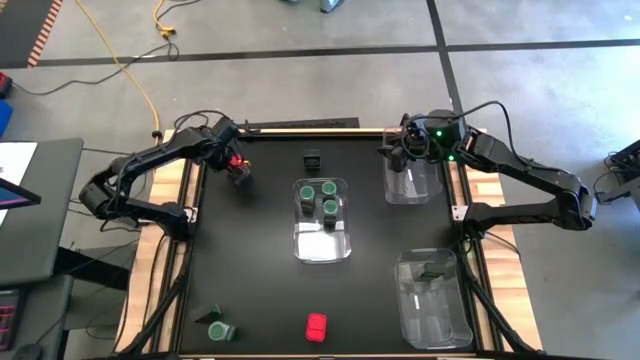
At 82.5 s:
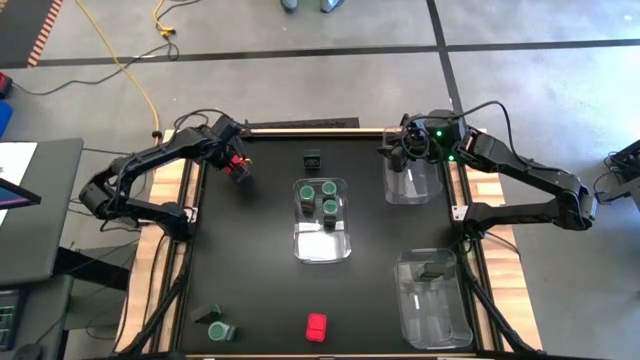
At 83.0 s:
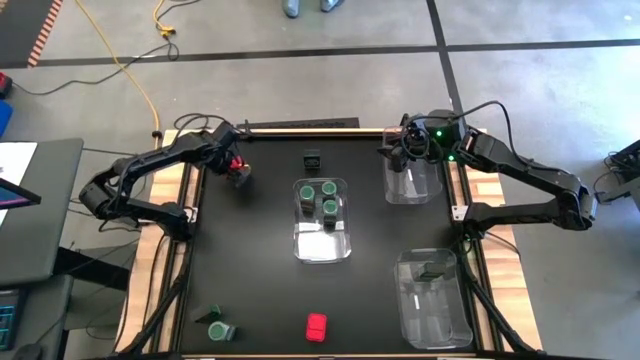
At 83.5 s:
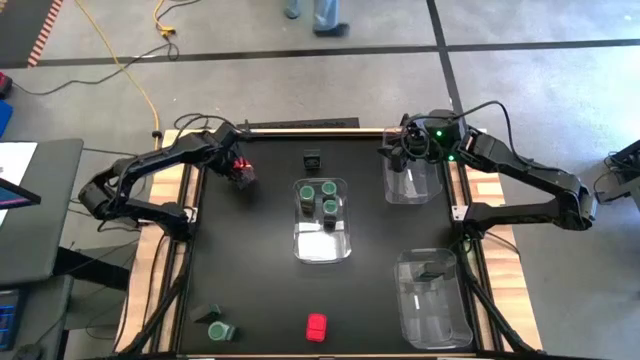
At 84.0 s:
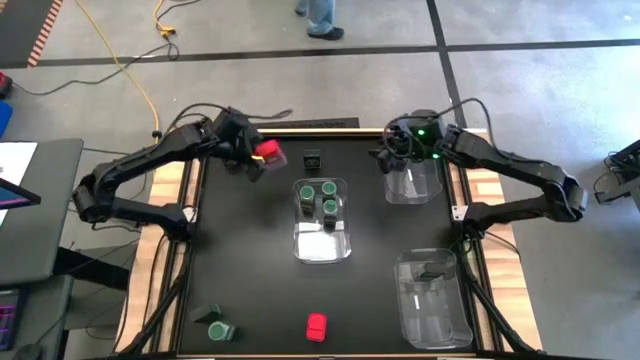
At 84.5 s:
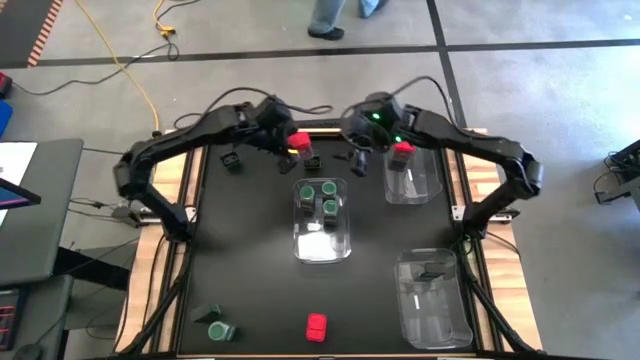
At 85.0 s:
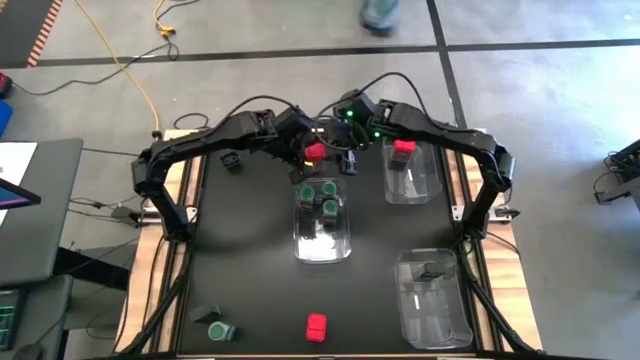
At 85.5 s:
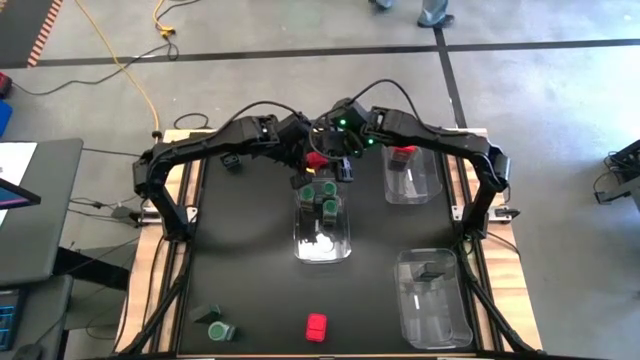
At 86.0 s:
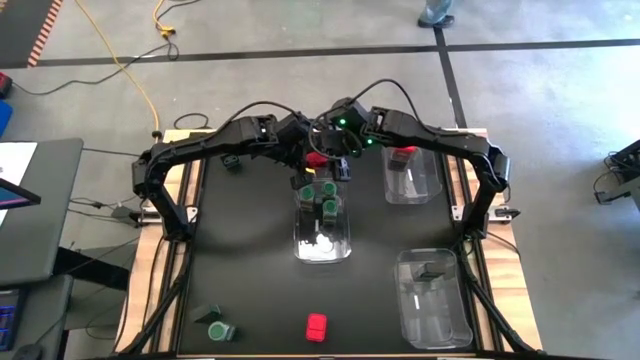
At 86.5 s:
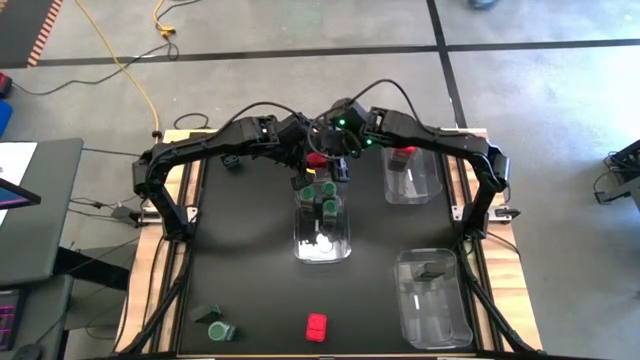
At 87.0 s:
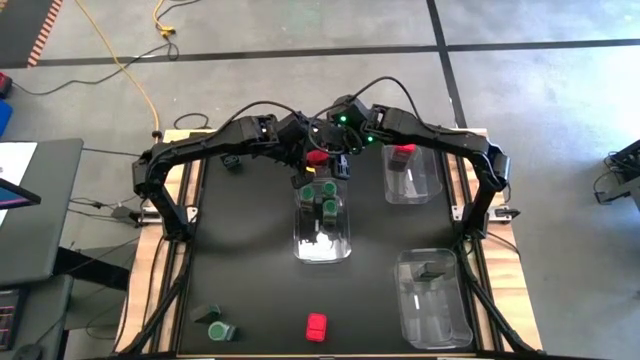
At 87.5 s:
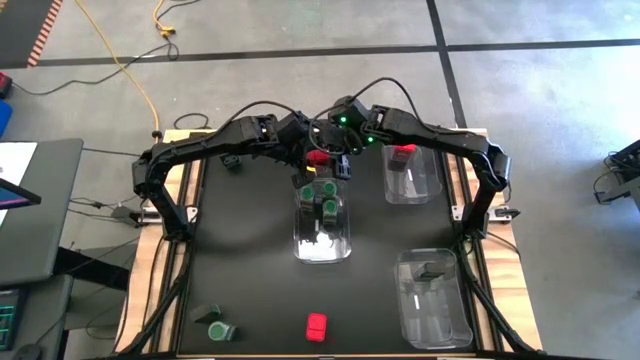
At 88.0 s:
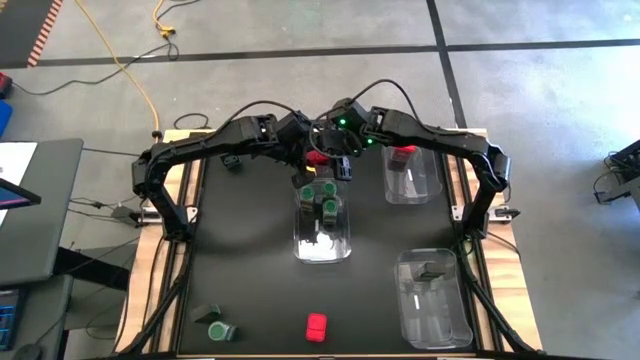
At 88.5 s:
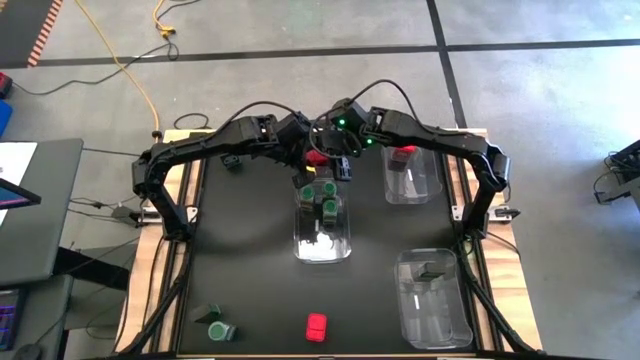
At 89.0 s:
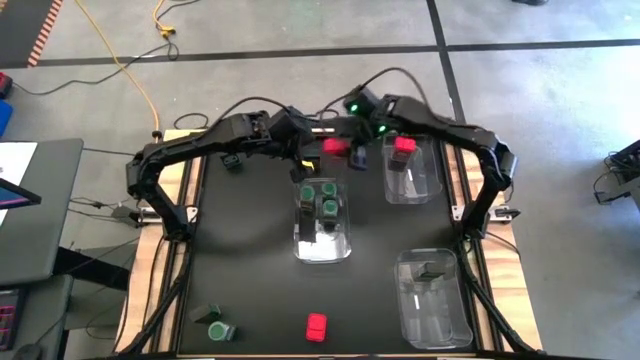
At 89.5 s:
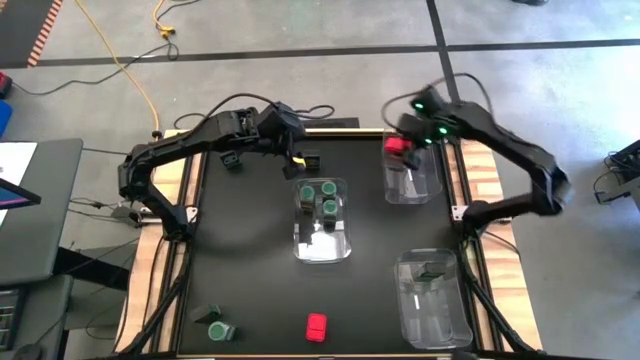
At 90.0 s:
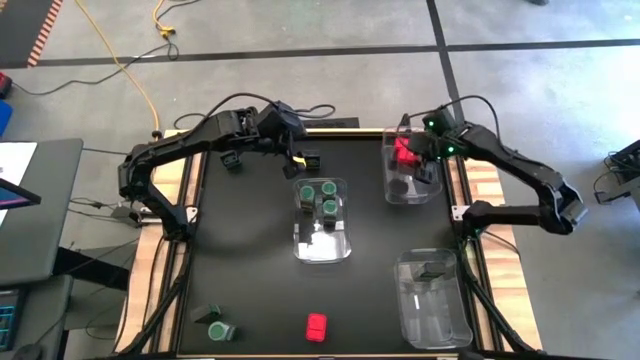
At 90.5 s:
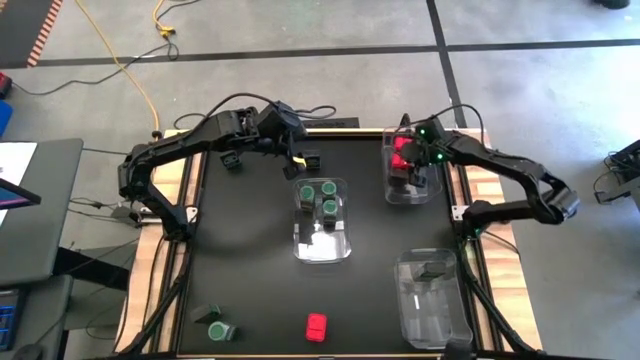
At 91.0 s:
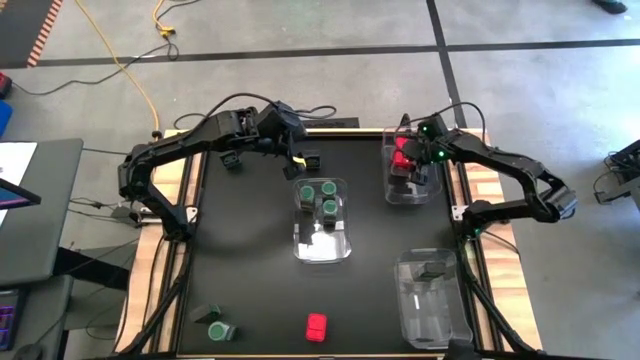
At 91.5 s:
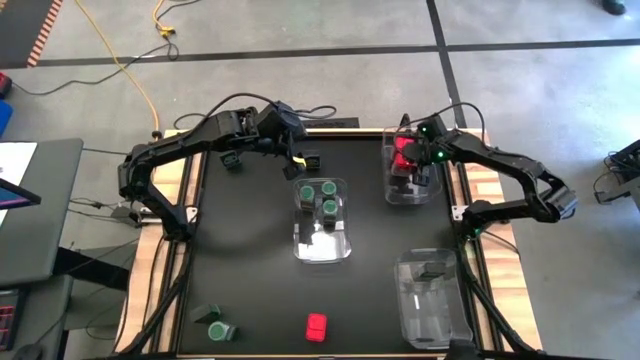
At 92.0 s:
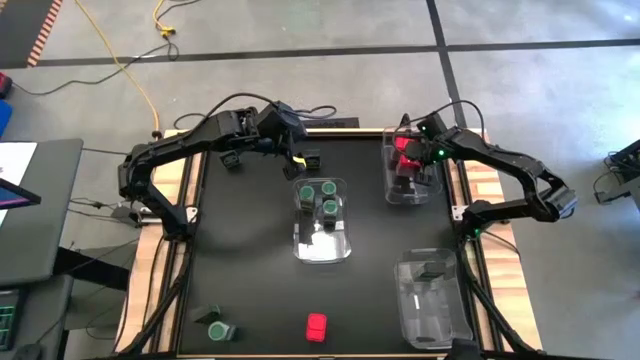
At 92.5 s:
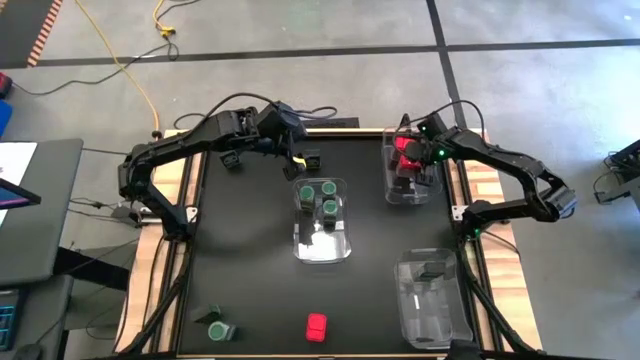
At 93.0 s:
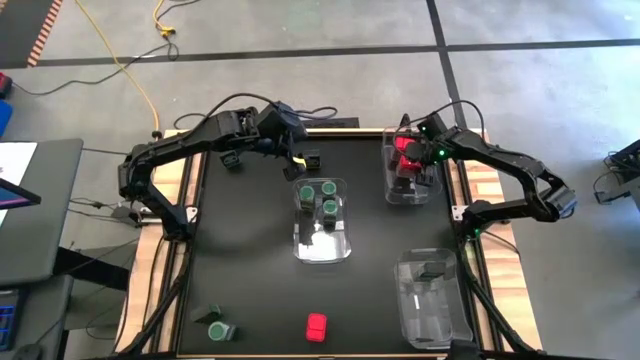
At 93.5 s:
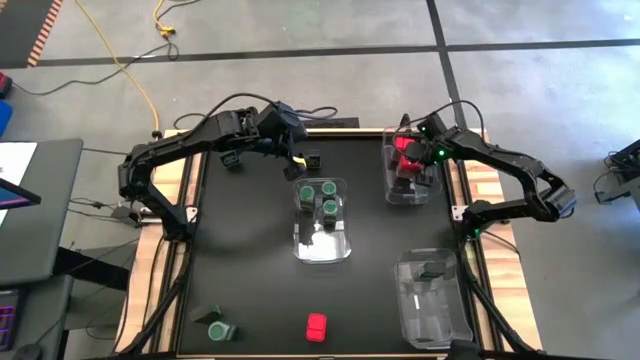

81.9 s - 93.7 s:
Task: Sort spices by type
Put the red seasoning can into the top transparent bin

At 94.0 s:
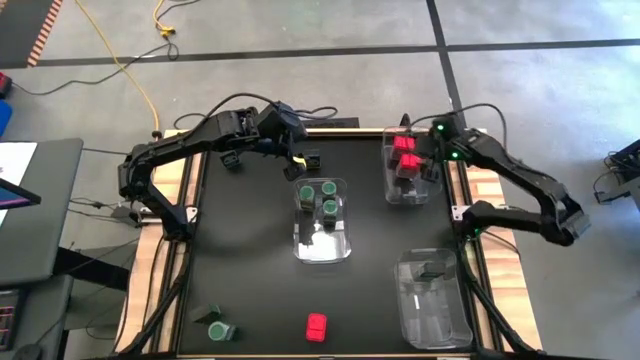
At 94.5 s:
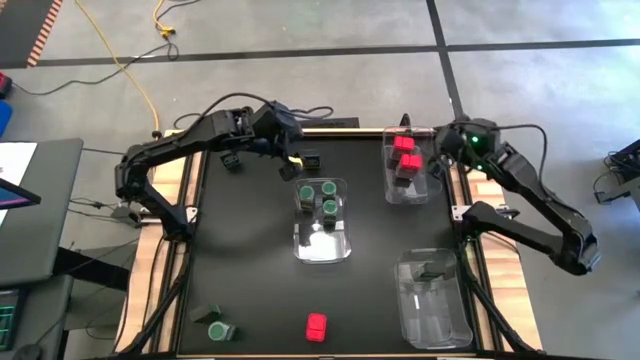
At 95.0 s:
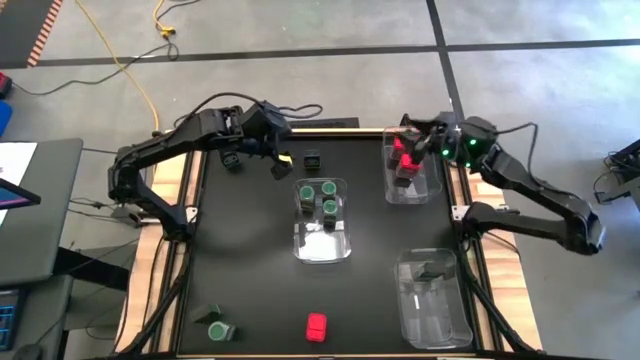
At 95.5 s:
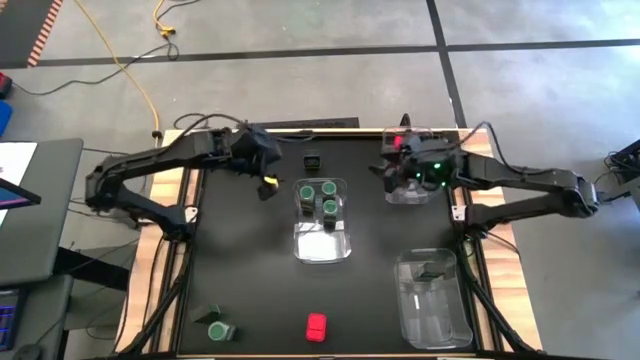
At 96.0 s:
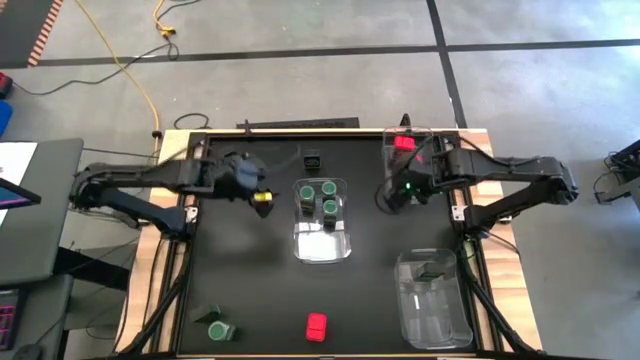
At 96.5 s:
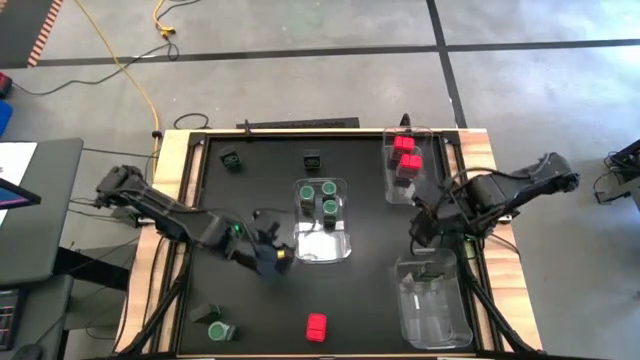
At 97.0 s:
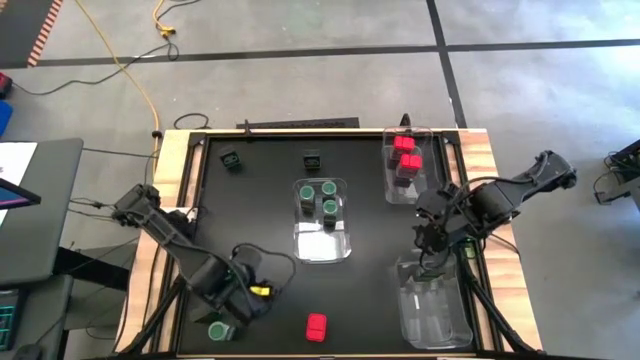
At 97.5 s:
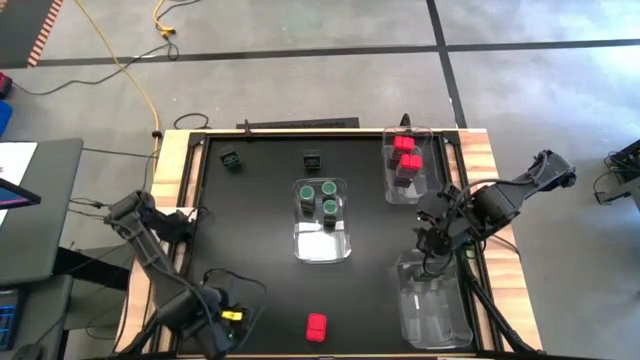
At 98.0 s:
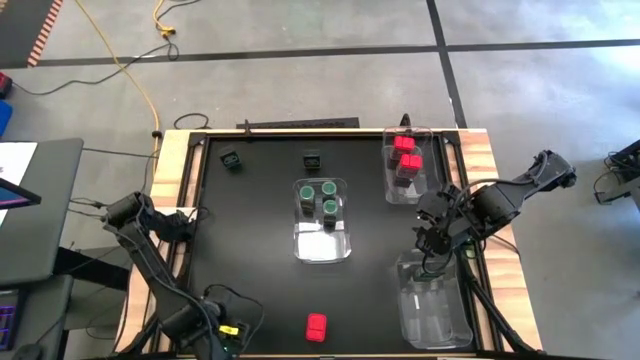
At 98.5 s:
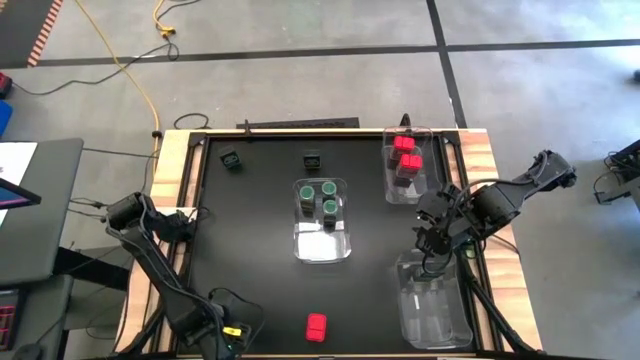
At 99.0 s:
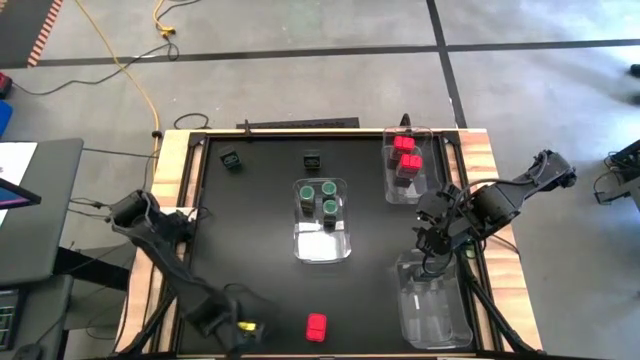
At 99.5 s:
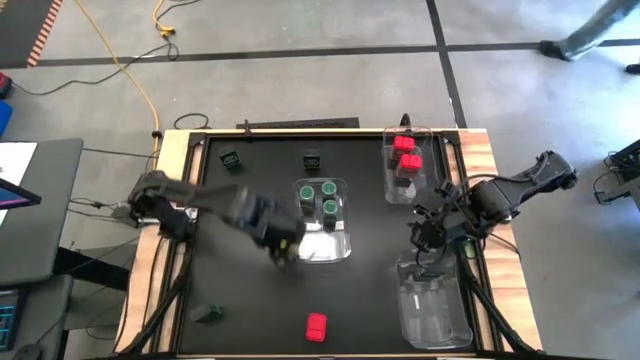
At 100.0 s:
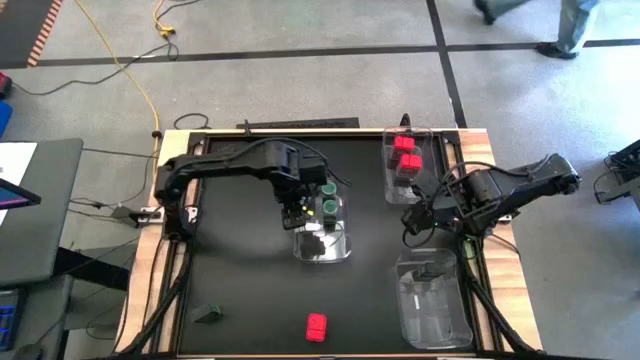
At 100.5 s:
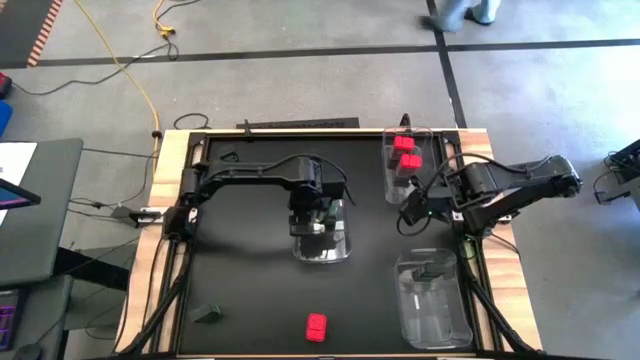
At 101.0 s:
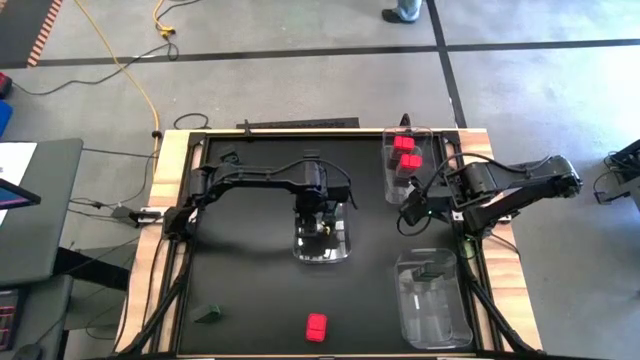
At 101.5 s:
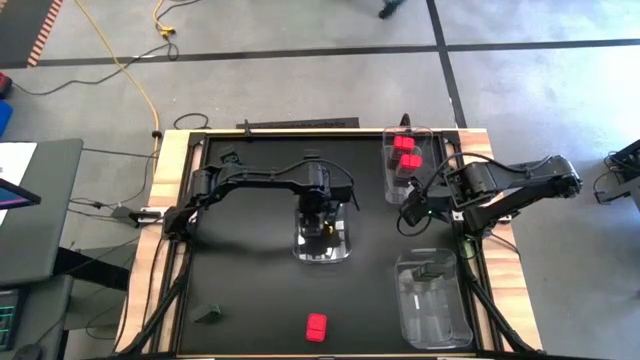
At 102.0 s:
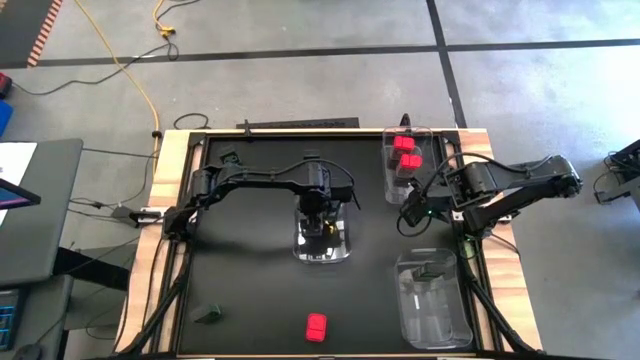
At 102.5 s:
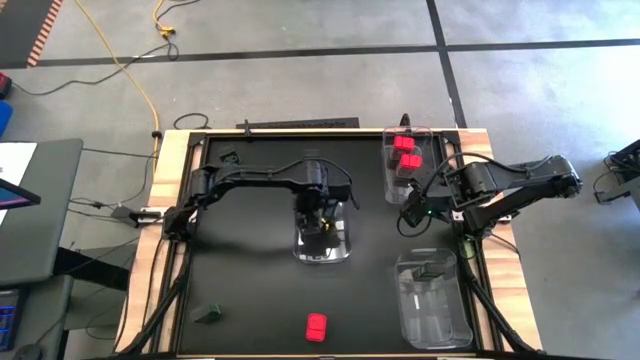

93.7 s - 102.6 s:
Put the green seasoning bottle into the middle left transparent bin
